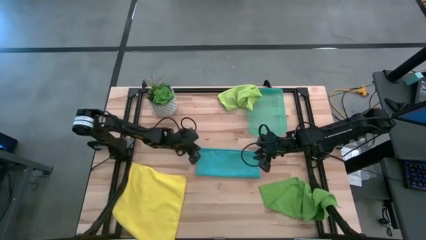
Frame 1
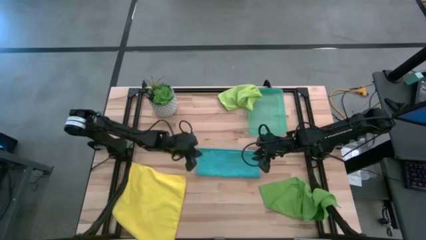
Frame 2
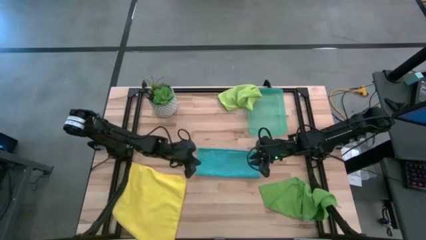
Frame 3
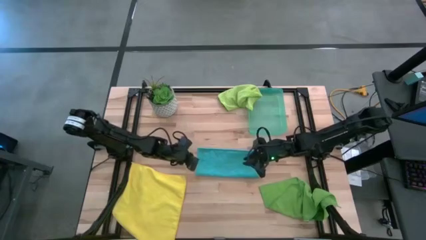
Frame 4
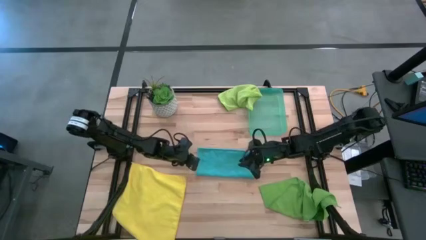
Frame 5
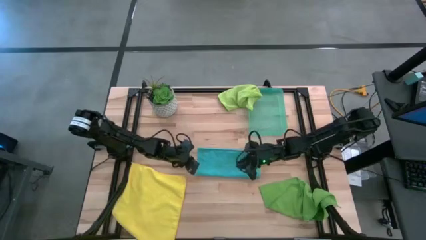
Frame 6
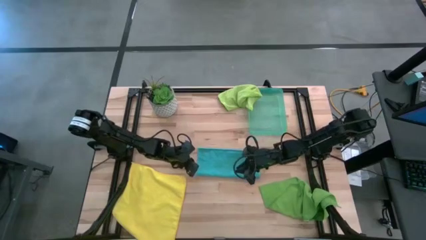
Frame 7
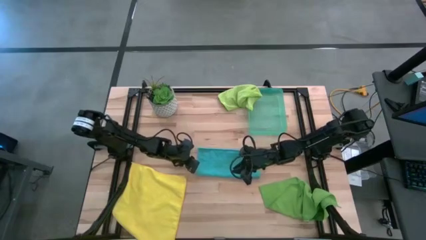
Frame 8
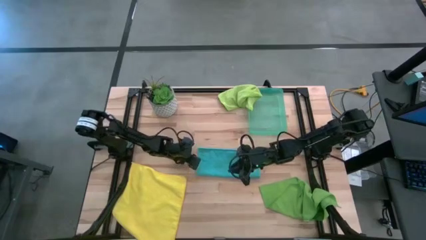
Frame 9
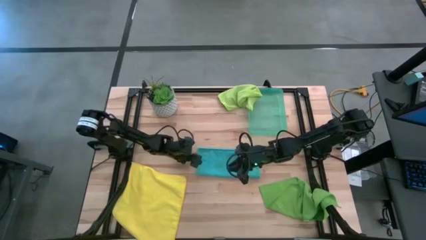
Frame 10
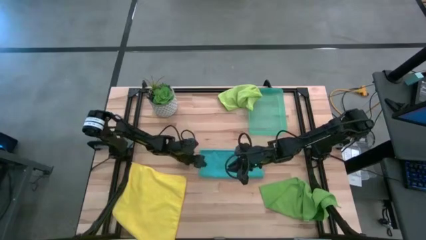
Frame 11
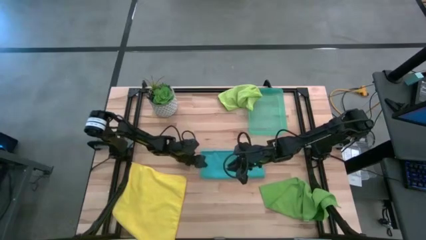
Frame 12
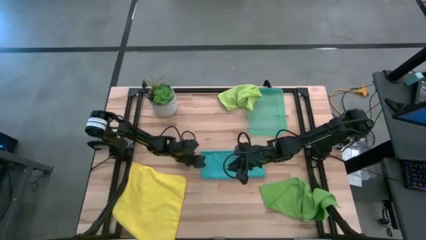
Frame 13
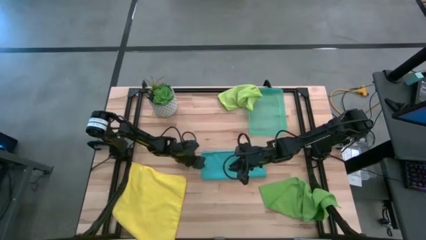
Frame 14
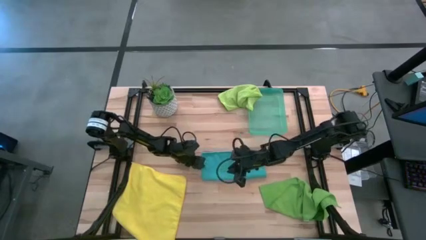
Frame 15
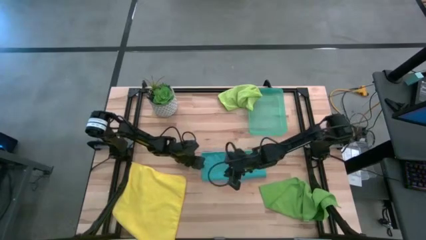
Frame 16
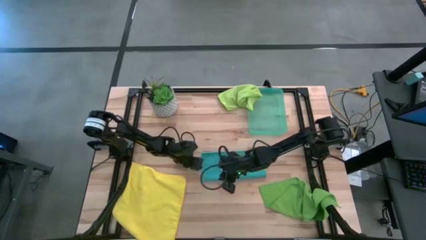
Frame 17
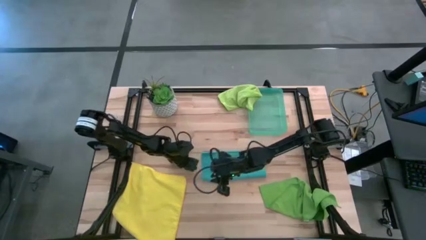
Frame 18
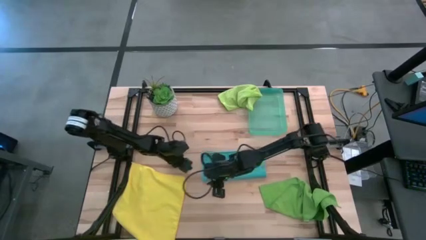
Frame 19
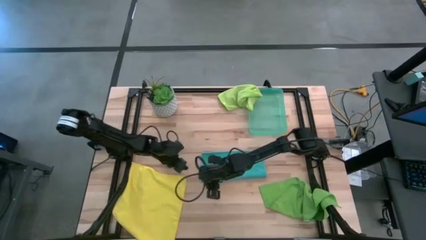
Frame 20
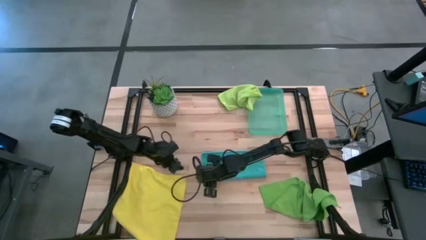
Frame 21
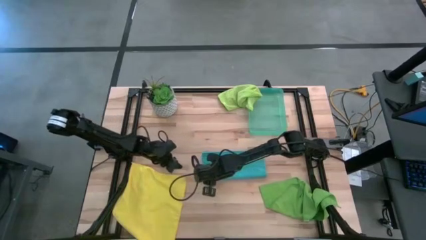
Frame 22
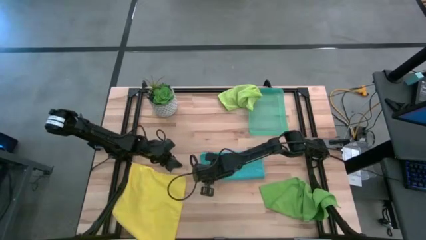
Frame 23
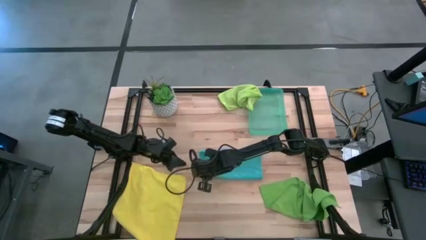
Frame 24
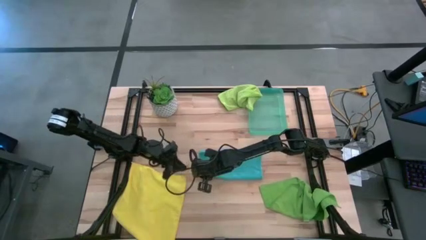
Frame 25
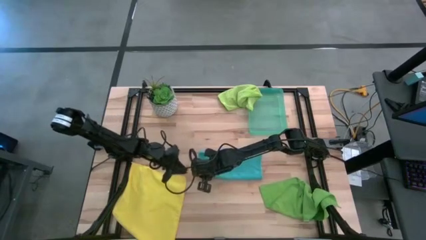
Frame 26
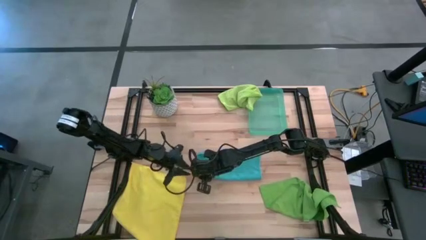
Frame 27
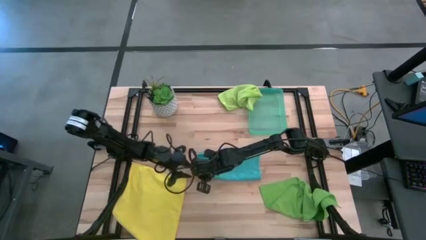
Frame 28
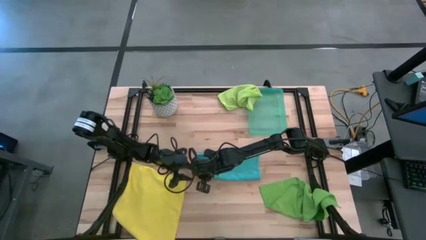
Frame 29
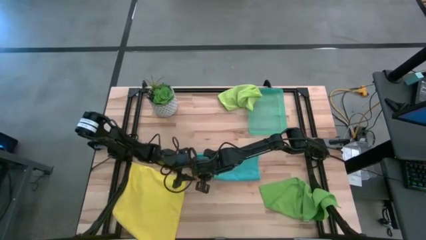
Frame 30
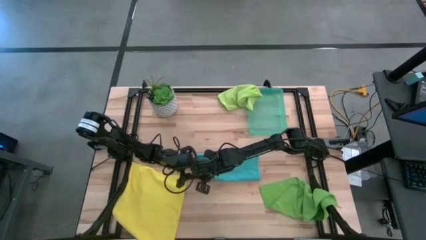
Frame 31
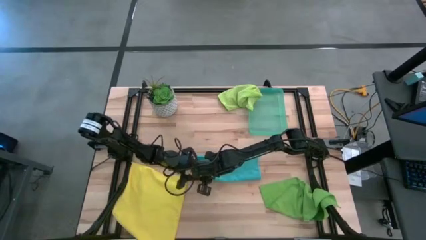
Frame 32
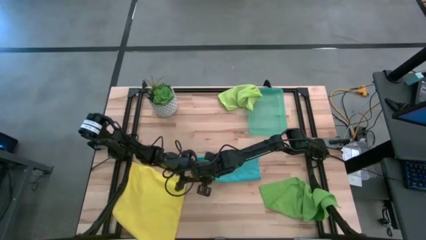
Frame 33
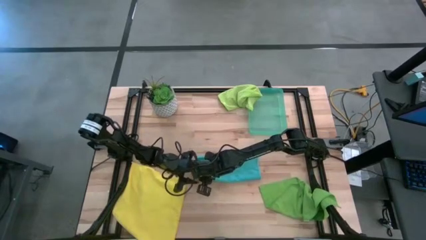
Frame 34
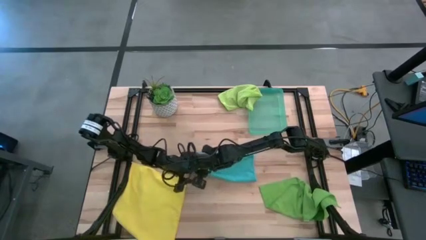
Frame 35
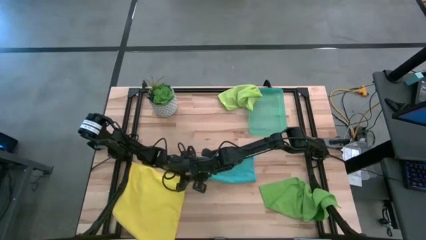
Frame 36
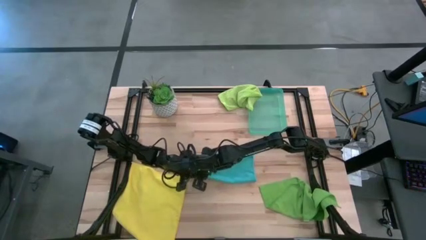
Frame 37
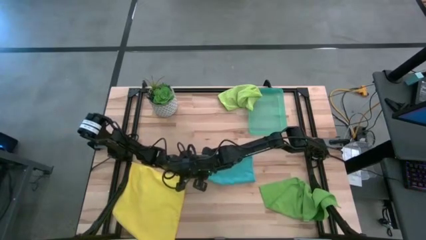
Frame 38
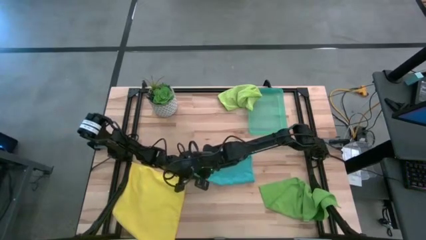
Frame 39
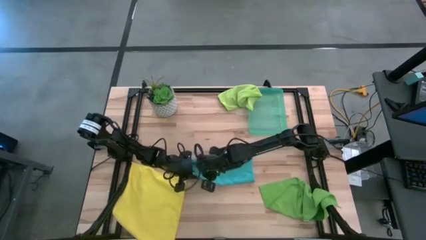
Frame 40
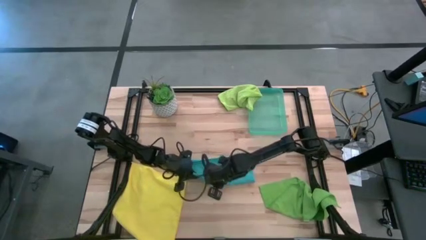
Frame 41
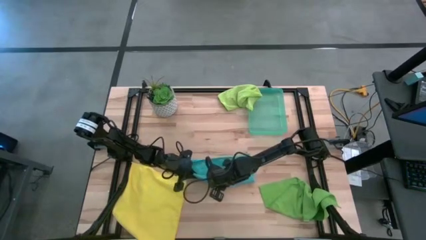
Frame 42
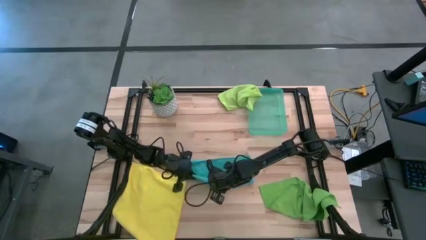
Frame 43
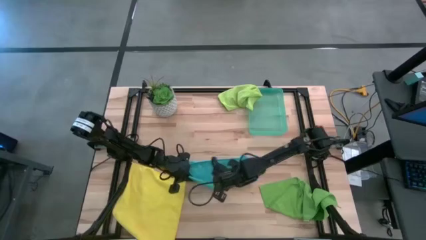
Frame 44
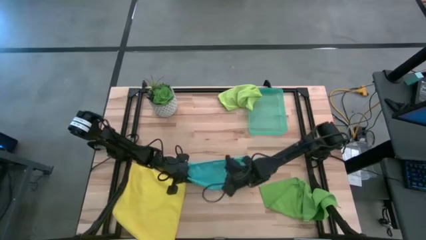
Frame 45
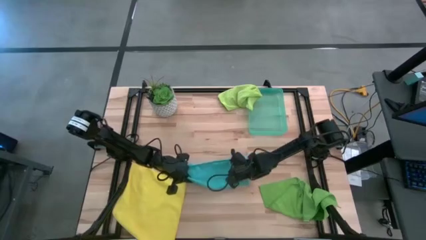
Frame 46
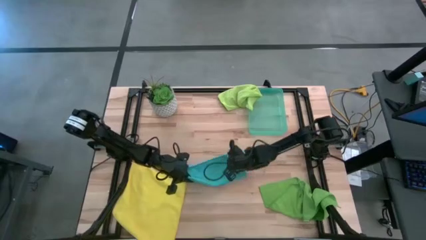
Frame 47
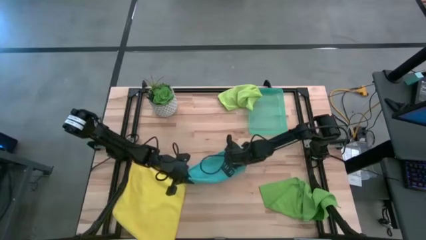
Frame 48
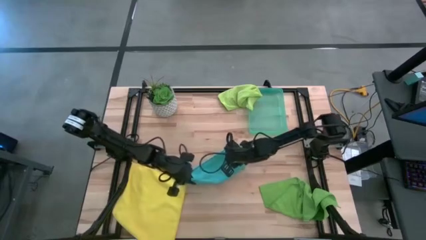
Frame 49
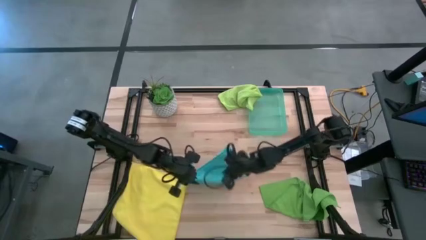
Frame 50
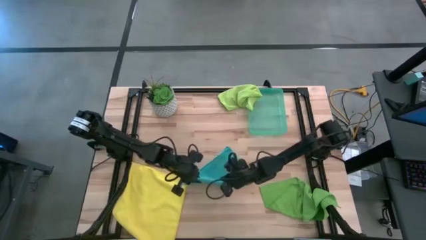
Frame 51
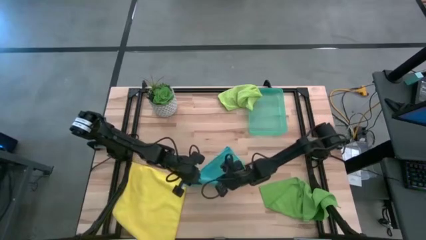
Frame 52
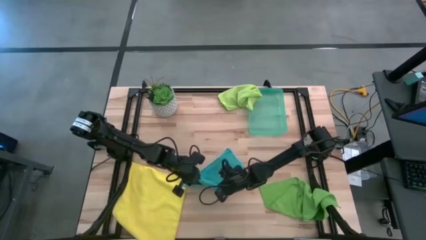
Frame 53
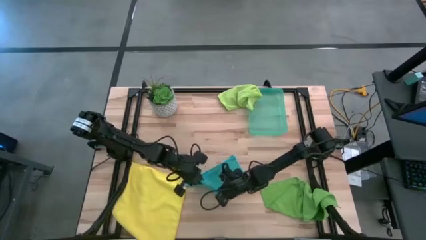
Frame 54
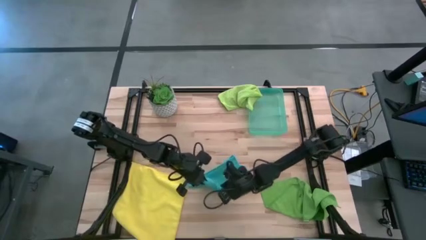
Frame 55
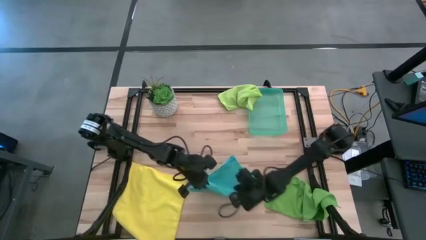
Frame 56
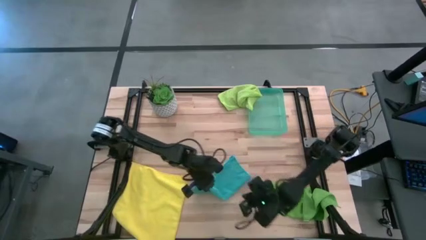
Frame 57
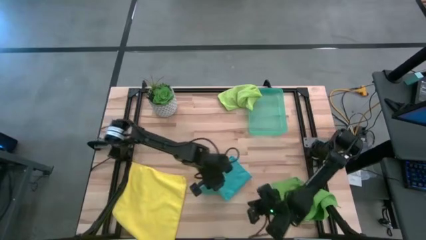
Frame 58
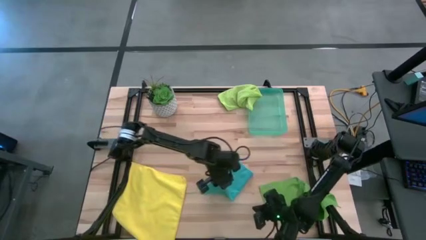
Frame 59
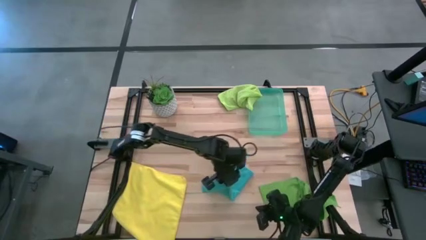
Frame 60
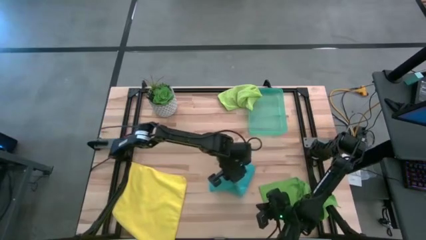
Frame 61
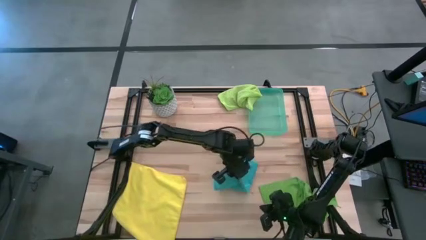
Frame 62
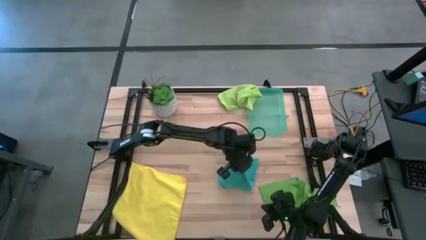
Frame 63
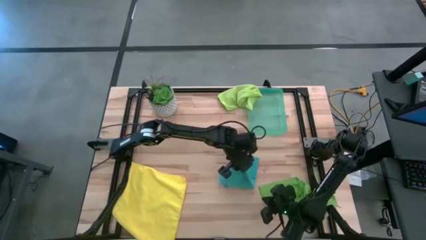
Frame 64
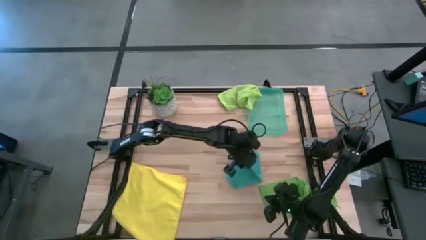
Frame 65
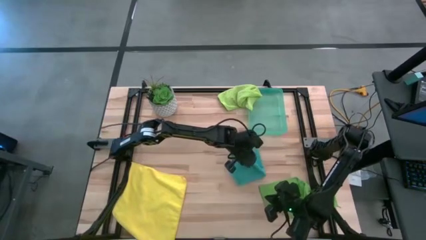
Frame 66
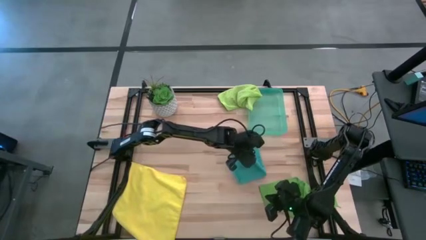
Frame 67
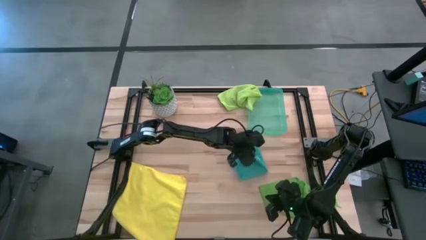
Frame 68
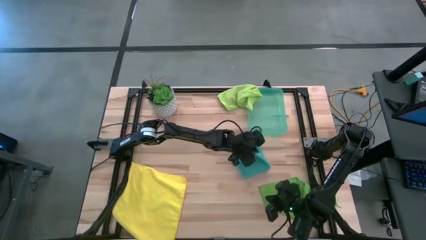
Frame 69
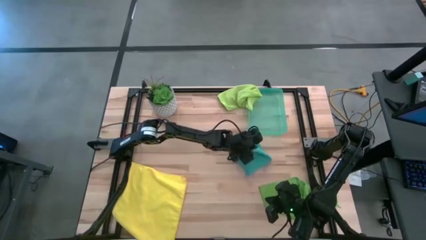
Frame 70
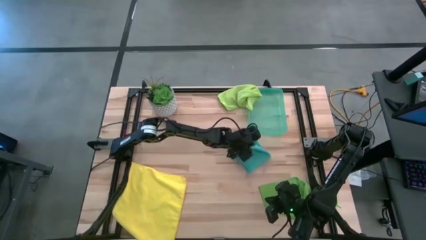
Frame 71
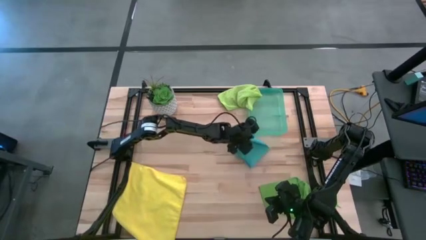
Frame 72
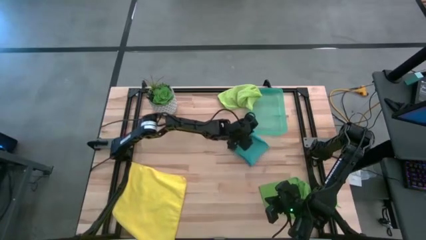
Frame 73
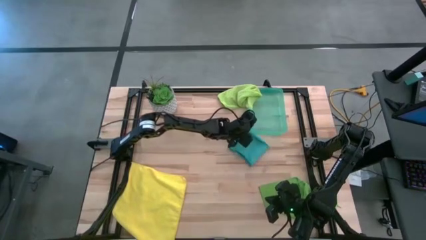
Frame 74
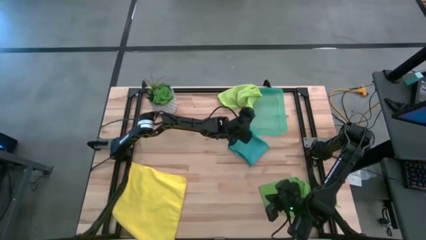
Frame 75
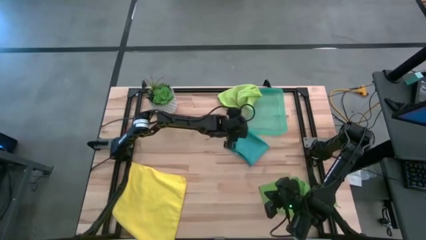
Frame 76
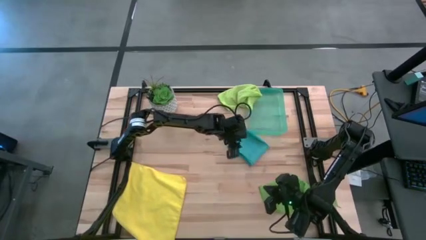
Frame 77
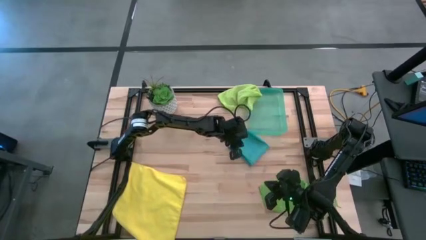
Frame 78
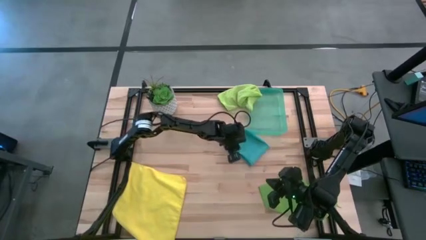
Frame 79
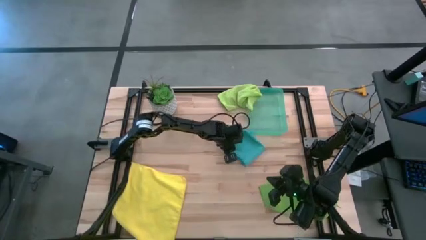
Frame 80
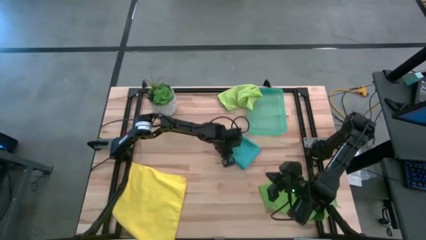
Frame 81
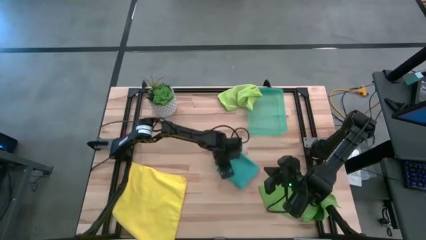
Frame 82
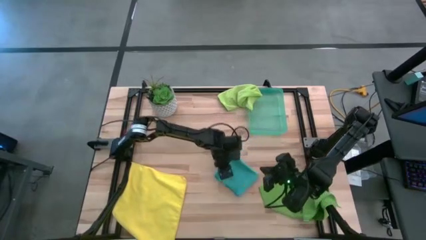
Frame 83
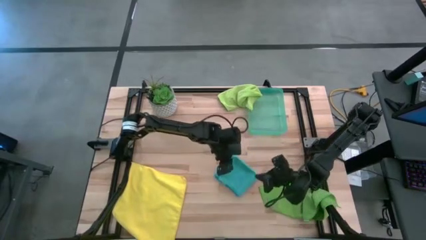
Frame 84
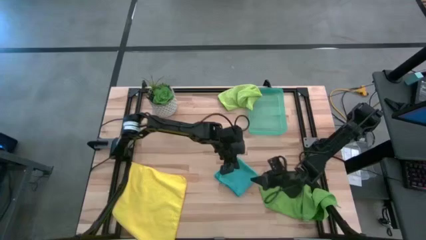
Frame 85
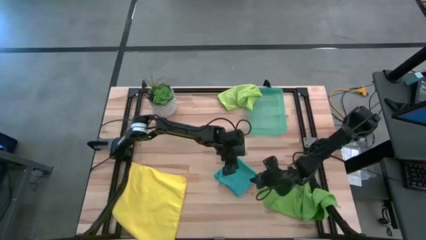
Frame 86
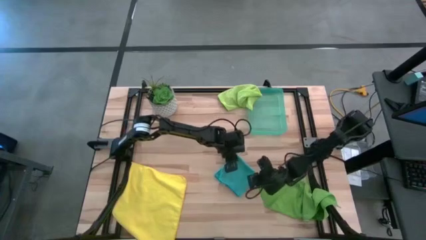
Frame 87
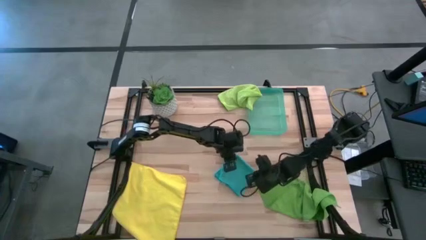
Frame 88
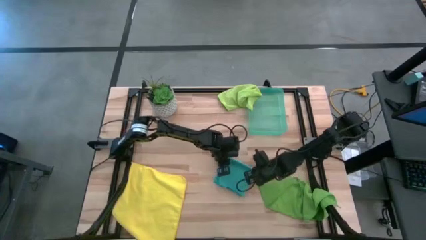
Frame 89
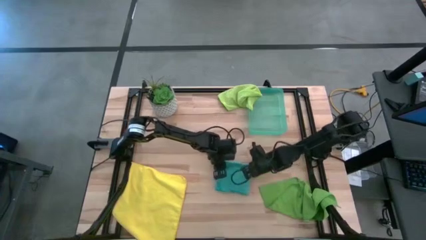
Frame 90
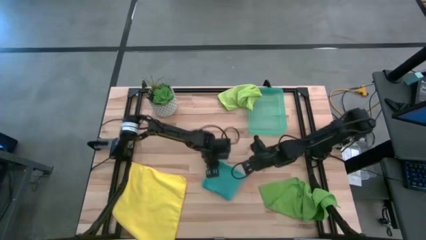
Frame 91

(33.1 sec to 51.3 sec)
Task: Fold microfiber towels
Fold the blue towel
